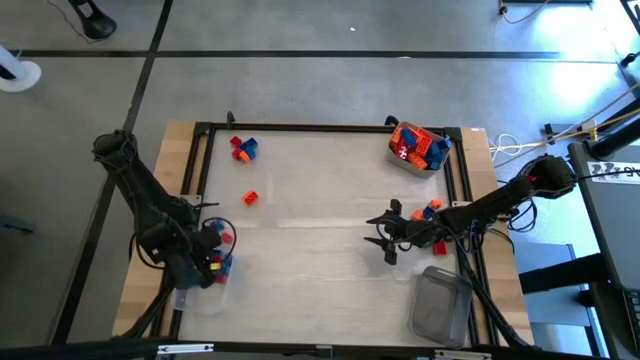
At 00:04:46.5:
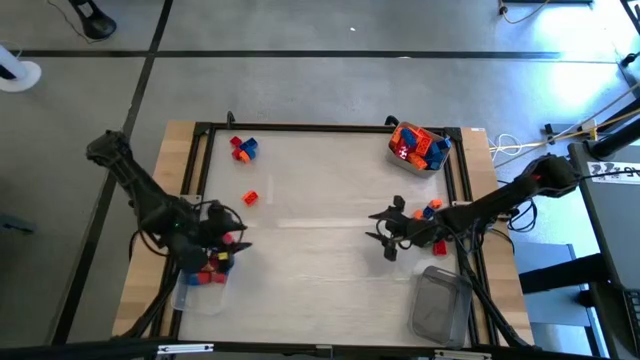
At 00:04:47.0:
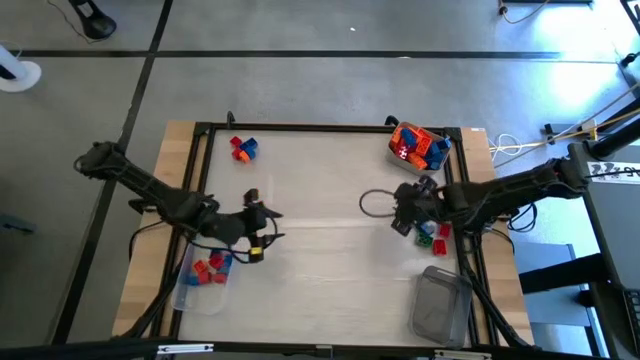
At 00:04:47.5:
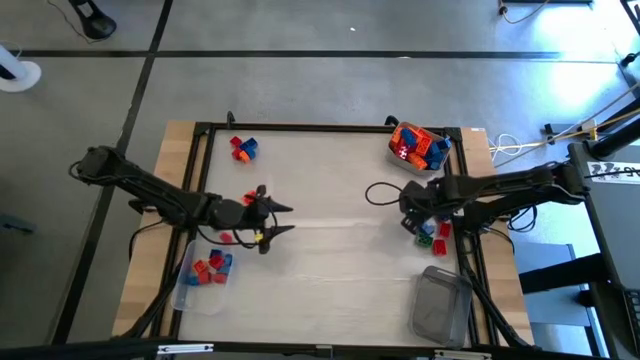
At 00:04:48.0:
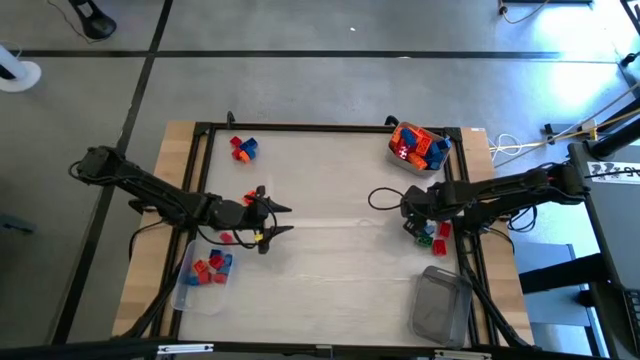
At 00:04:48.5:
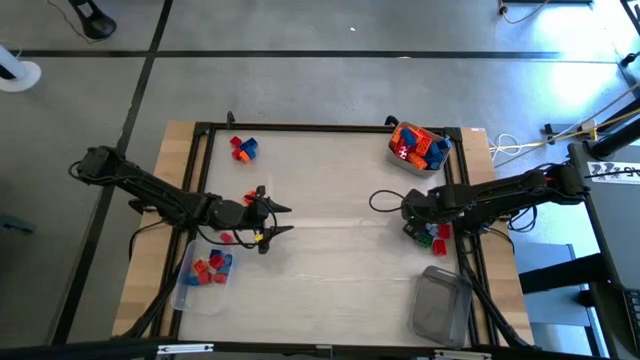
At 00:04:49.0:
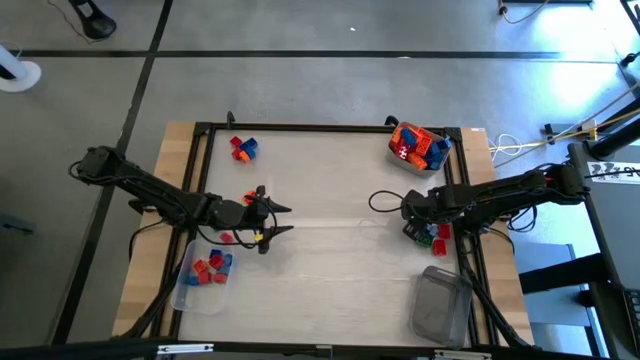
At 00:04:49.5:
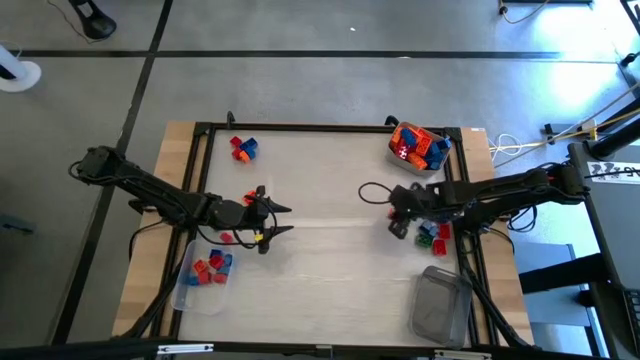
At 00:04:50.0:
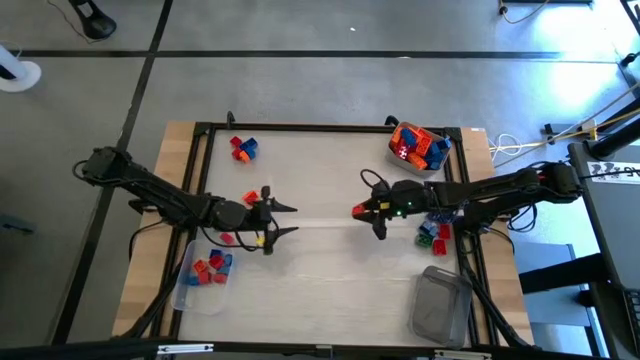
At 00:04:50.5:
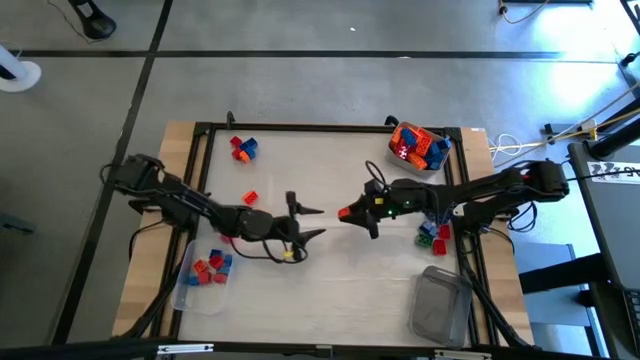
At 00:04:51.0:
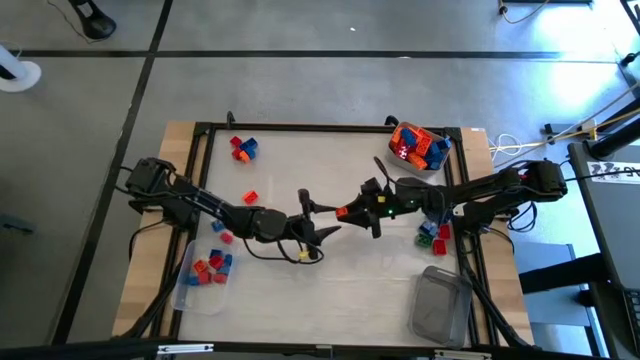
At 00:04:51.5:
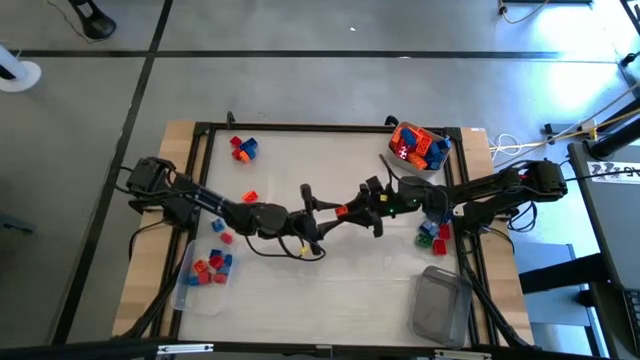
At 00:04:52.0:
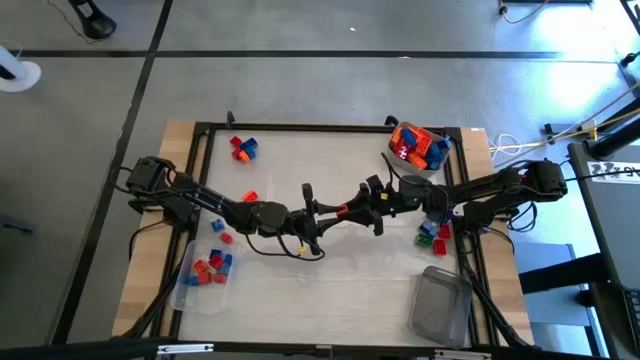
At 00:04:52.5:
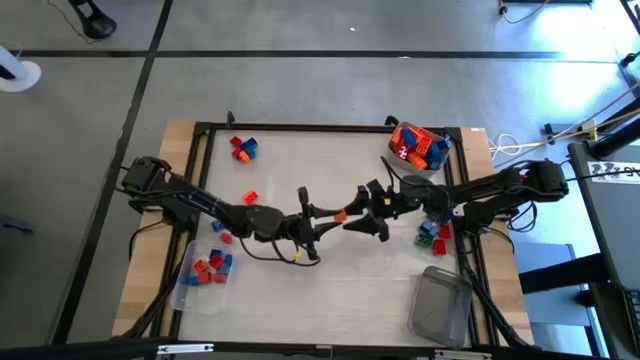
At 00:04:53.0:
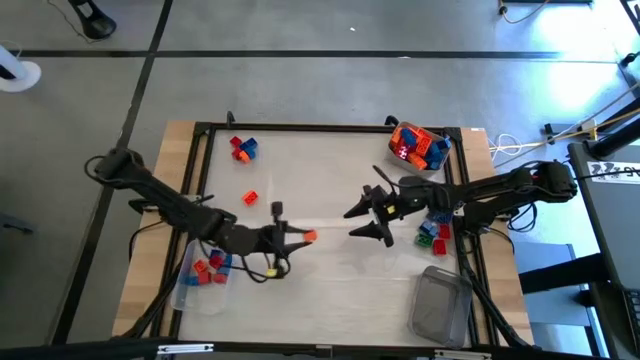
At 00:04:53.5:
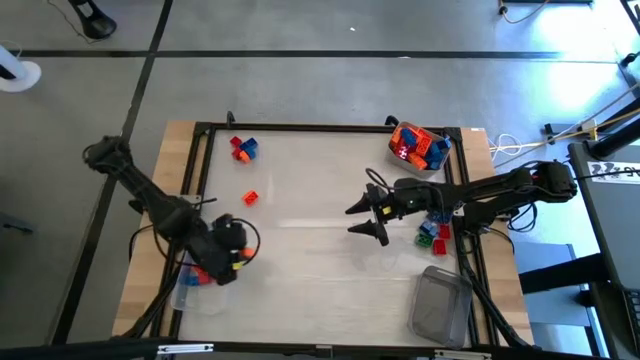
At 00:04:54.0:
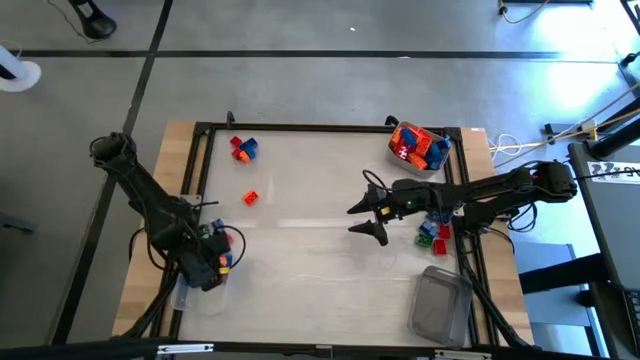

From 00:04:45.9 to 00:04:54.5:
Task: Sort blocks by size
Put the orange game piece into the transparent bin

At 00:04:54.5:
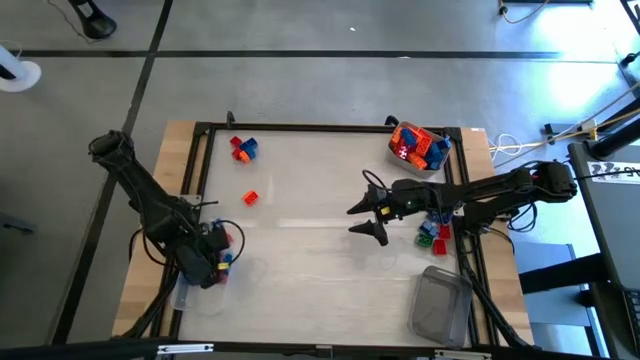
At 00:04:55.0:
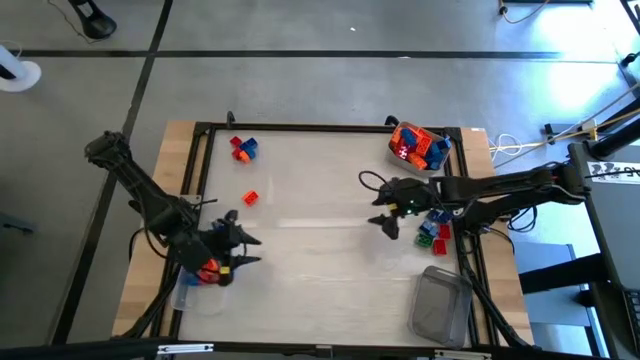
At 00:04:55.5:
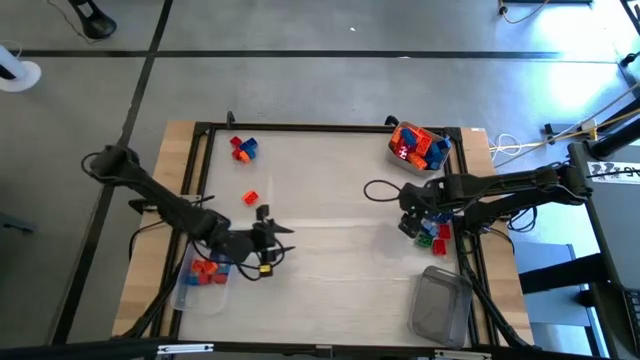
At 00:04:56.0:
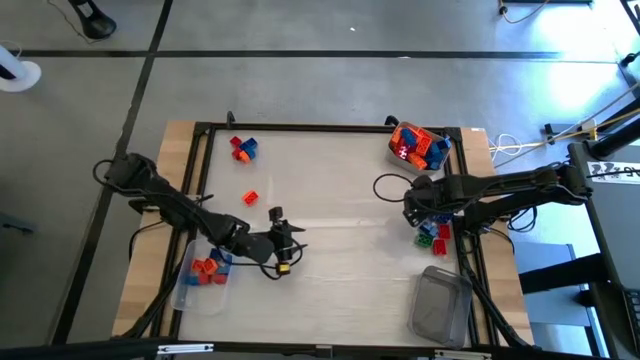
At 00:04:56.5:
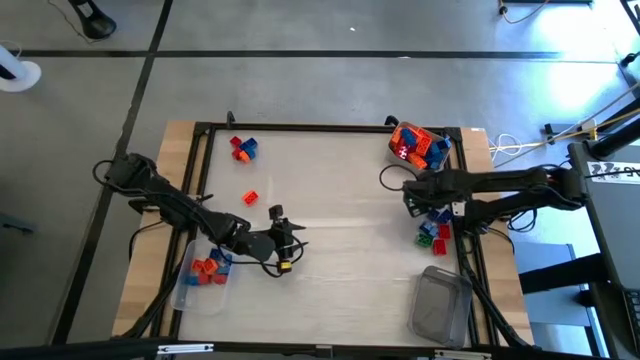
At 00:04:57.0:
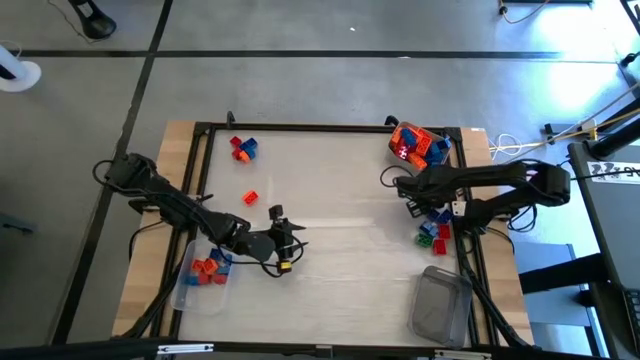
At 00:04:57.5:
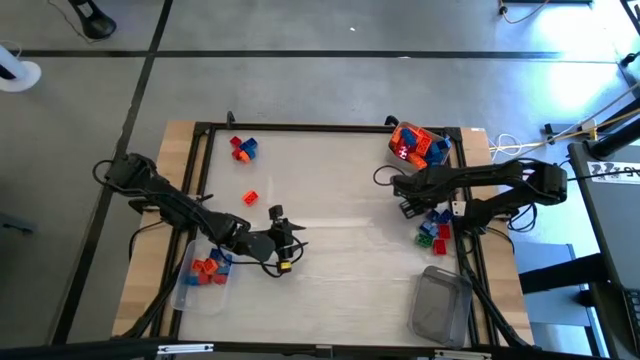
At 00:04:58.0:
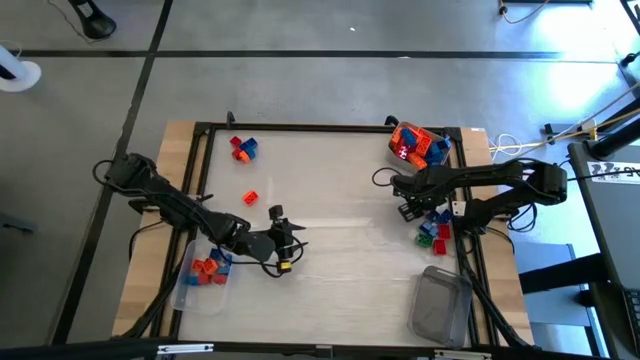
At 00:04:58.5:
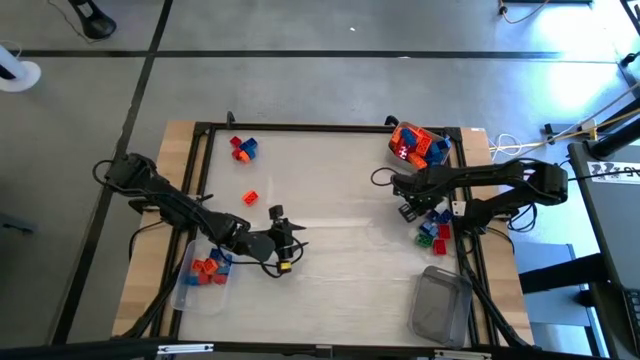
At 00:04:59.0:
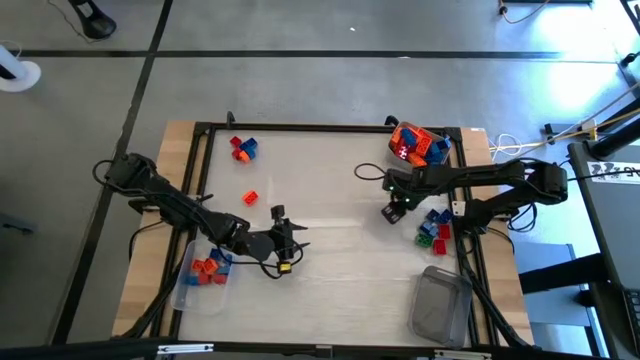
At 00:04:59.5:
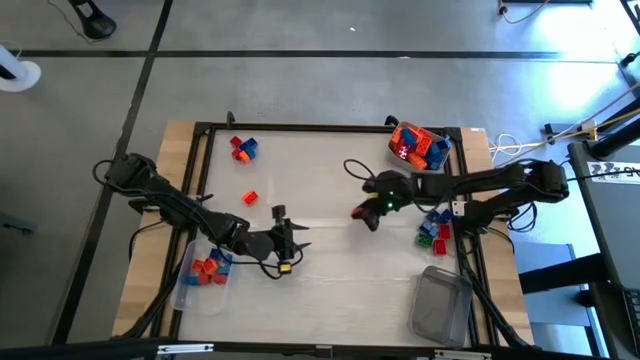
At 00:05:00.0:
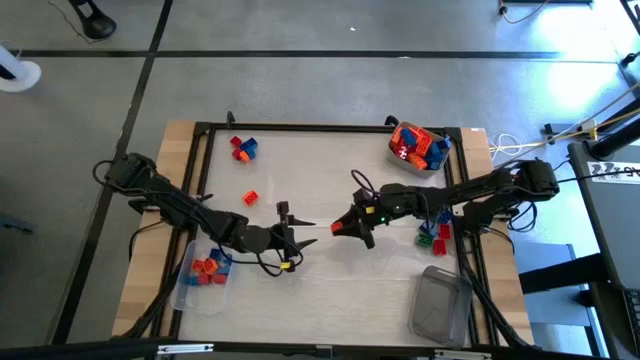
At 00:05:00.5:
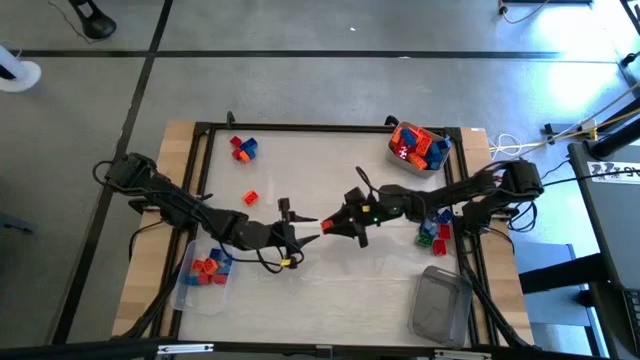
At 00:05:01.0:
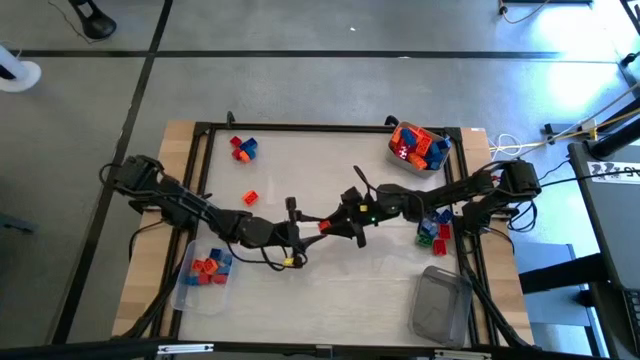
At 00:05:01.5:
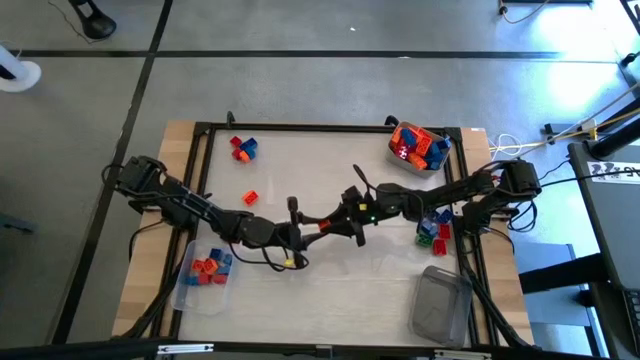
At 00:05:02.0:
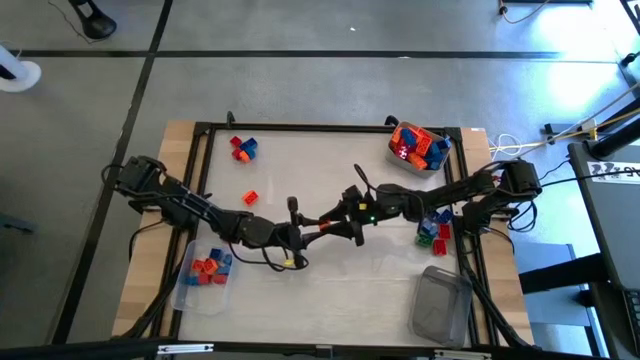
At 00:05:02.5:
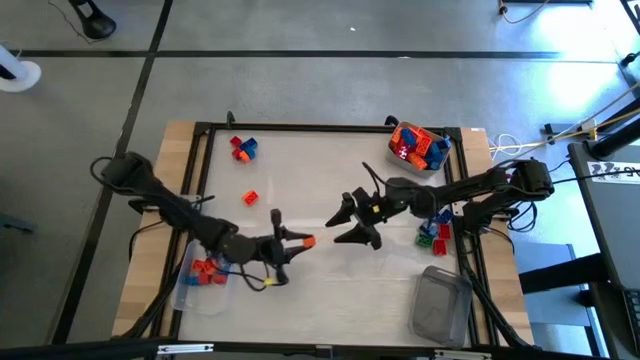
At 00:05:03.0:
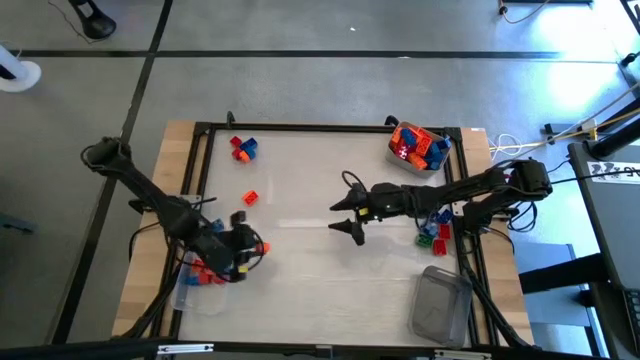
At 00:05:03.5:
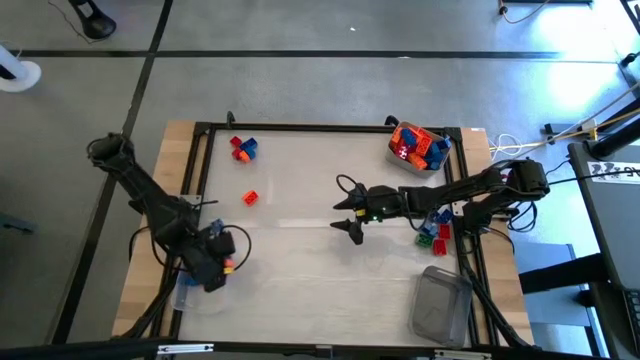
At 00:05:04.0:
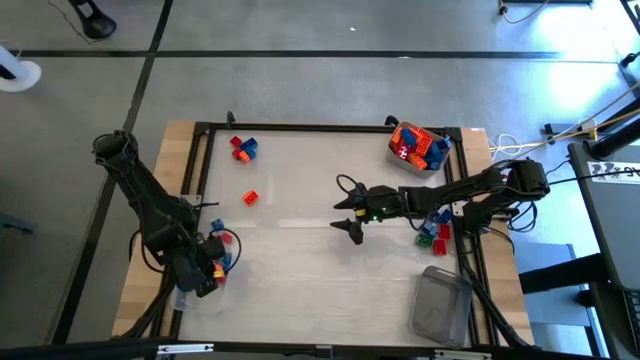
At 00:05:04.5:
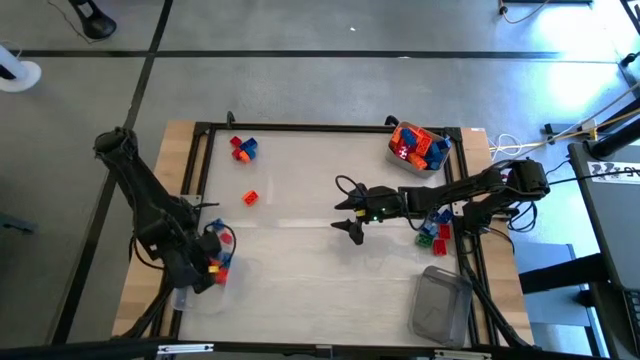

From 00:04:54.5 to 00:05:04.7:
Put the orange game piece into the transparent bin
